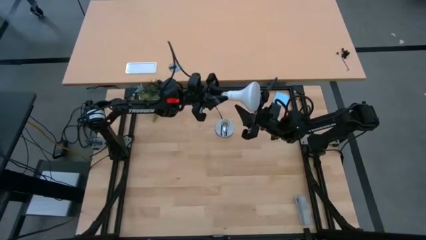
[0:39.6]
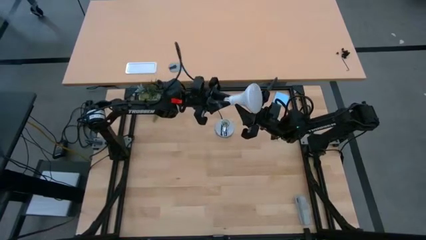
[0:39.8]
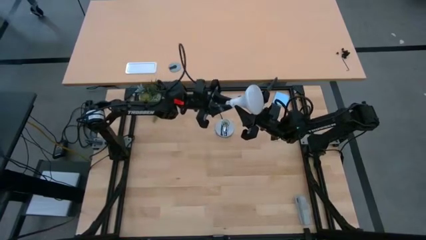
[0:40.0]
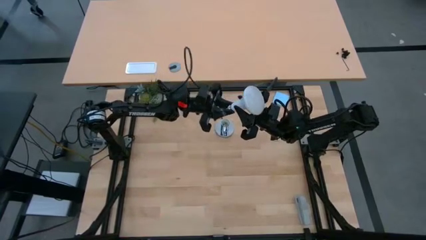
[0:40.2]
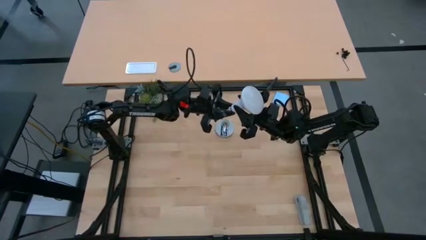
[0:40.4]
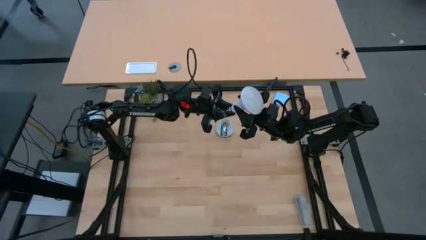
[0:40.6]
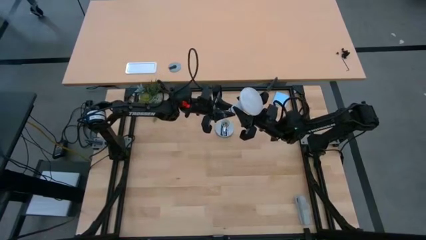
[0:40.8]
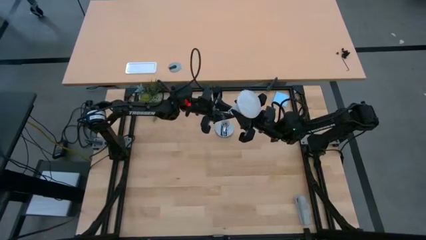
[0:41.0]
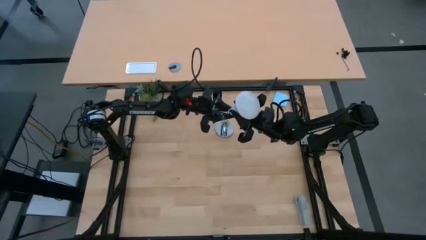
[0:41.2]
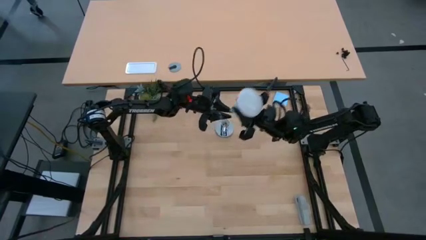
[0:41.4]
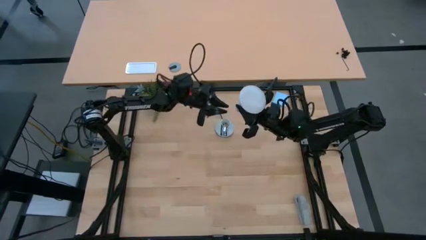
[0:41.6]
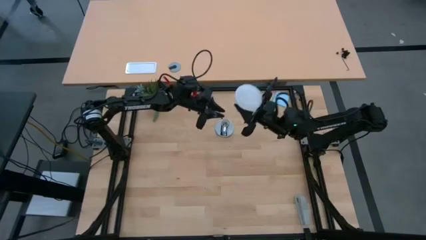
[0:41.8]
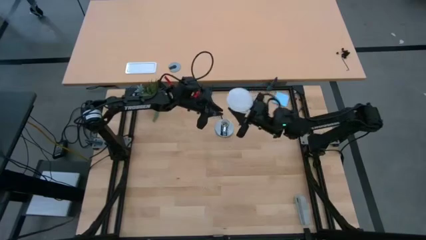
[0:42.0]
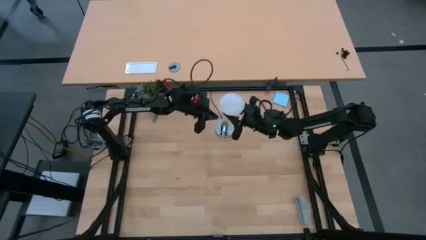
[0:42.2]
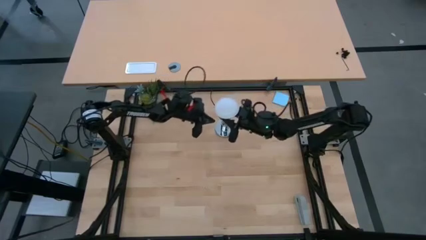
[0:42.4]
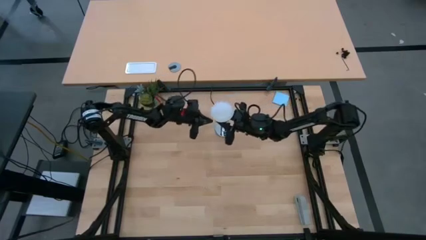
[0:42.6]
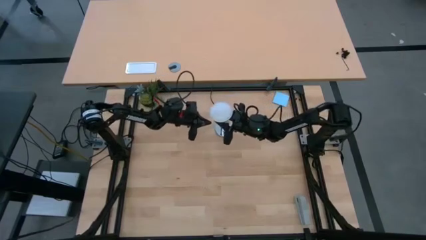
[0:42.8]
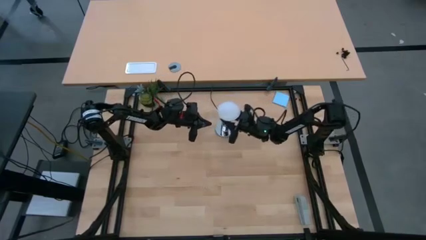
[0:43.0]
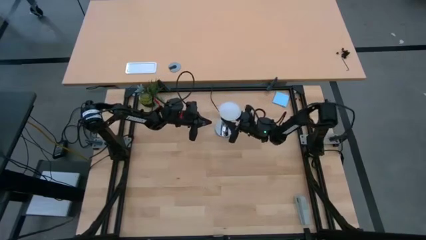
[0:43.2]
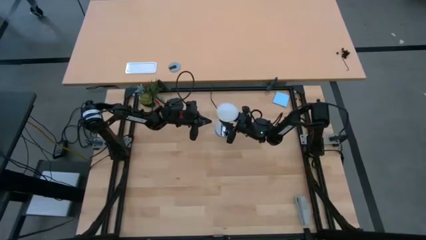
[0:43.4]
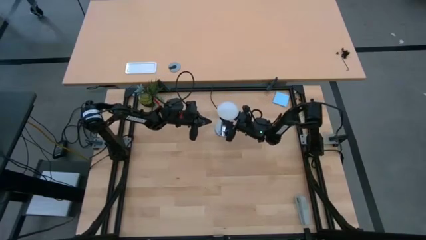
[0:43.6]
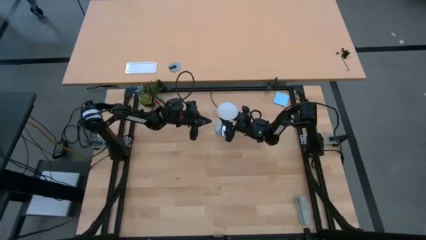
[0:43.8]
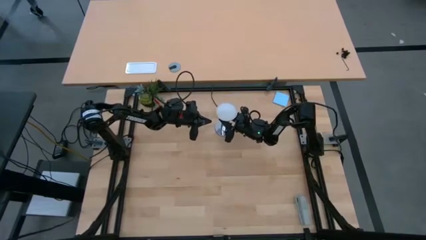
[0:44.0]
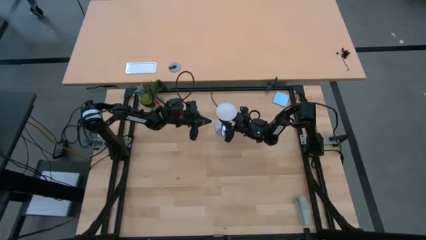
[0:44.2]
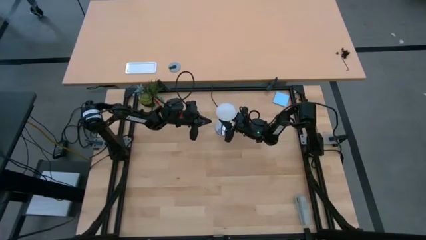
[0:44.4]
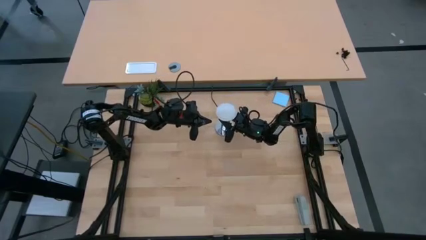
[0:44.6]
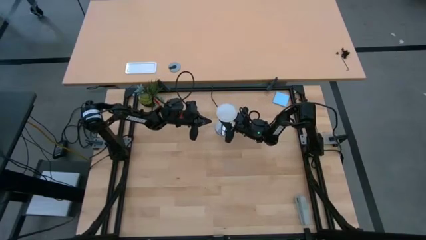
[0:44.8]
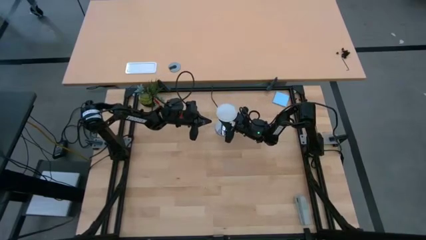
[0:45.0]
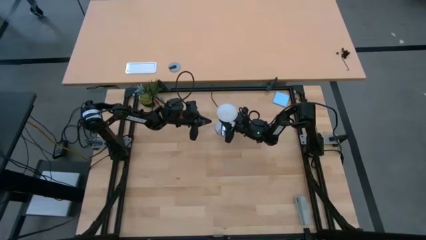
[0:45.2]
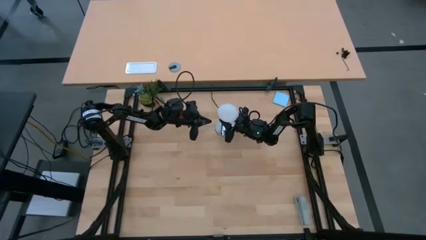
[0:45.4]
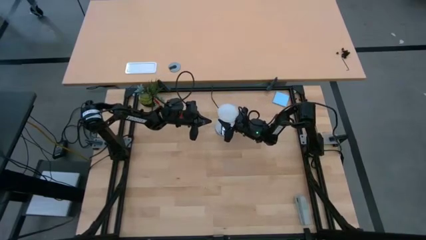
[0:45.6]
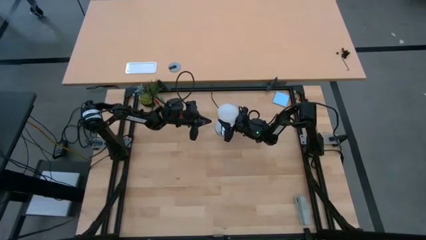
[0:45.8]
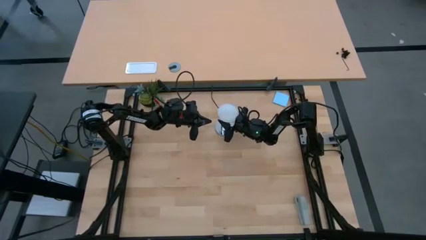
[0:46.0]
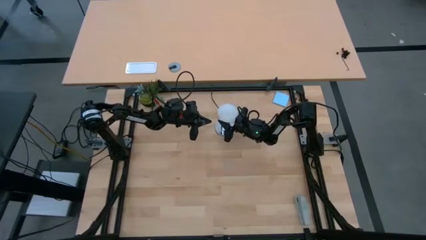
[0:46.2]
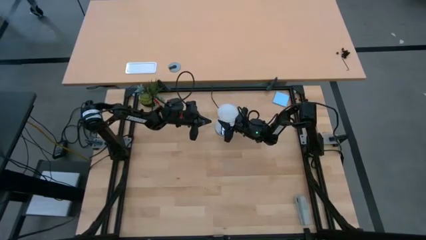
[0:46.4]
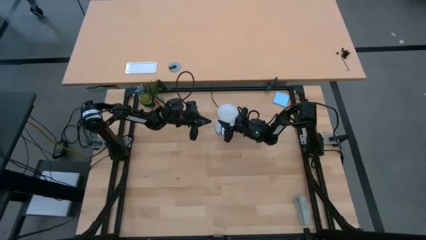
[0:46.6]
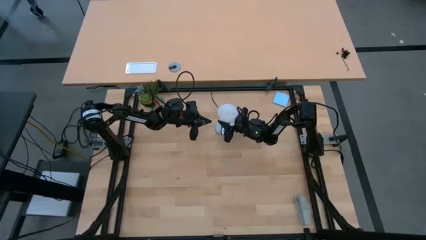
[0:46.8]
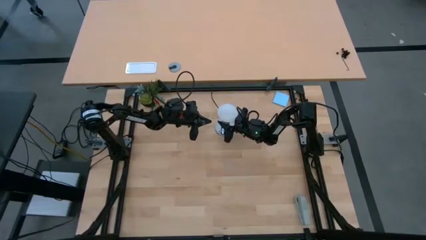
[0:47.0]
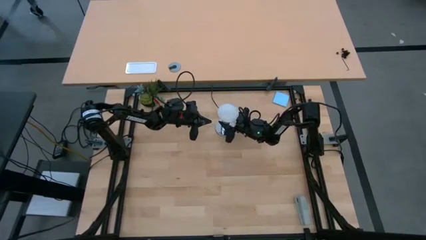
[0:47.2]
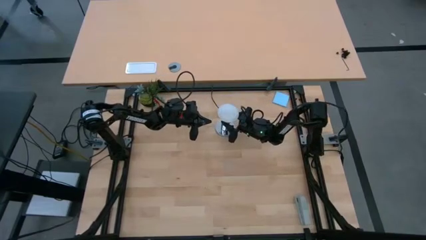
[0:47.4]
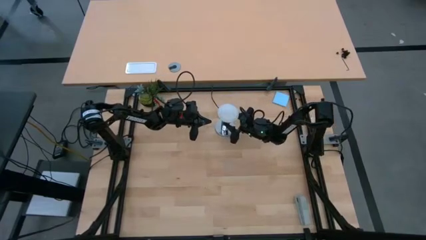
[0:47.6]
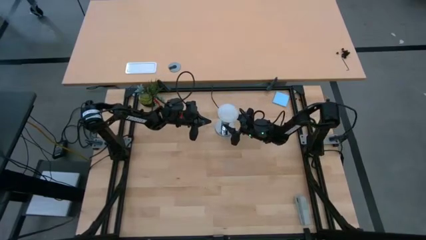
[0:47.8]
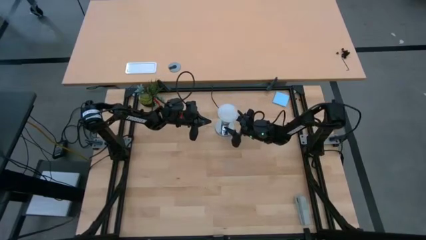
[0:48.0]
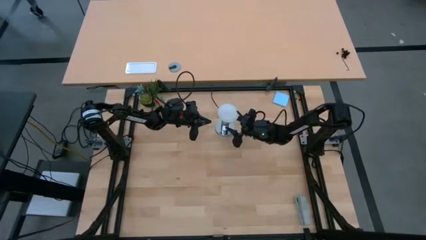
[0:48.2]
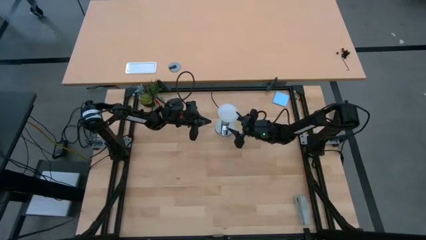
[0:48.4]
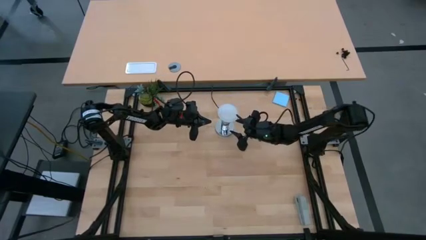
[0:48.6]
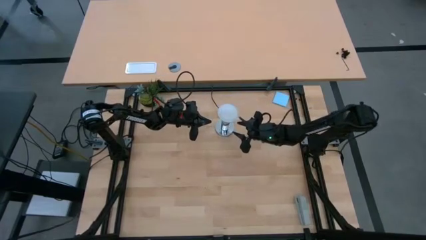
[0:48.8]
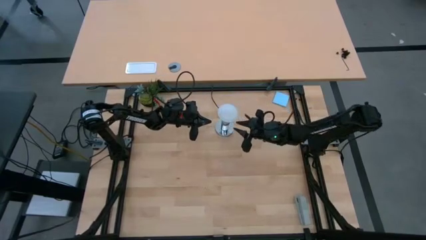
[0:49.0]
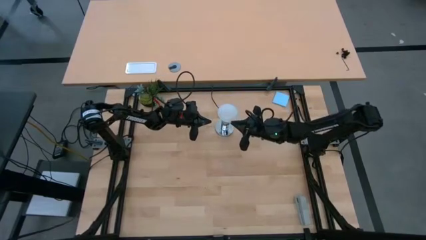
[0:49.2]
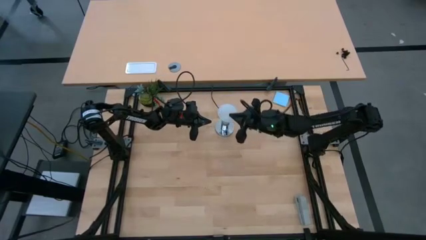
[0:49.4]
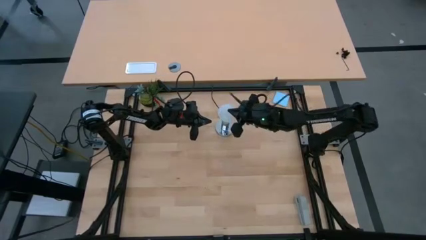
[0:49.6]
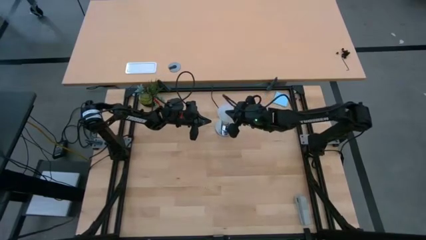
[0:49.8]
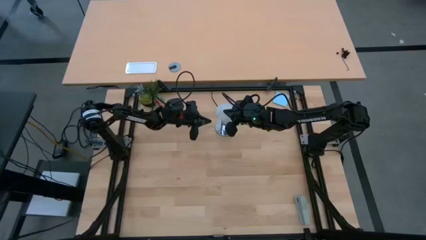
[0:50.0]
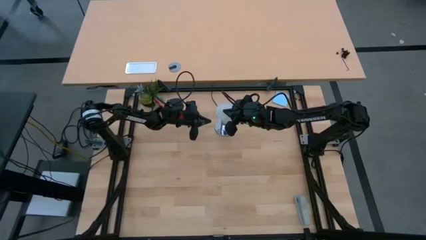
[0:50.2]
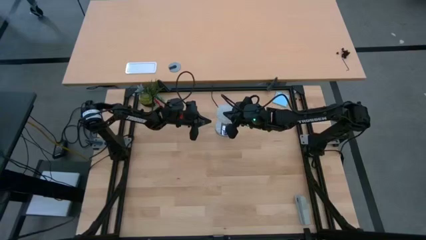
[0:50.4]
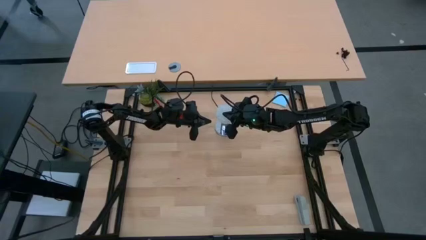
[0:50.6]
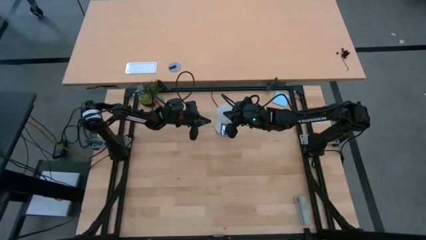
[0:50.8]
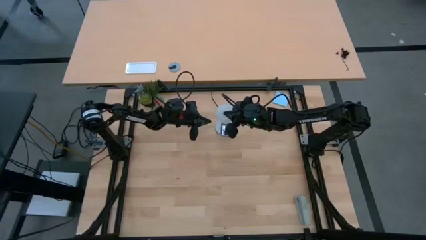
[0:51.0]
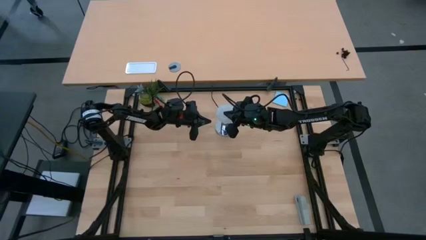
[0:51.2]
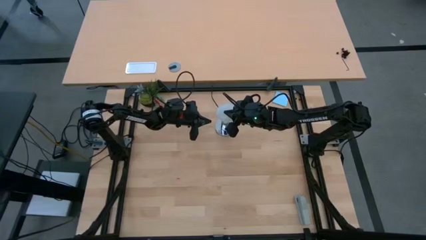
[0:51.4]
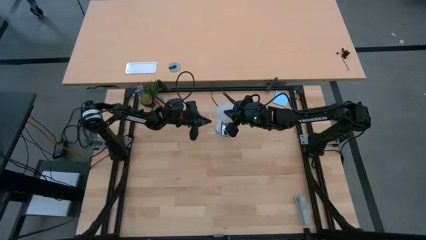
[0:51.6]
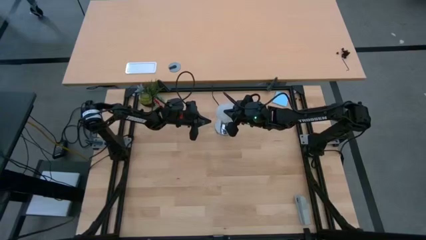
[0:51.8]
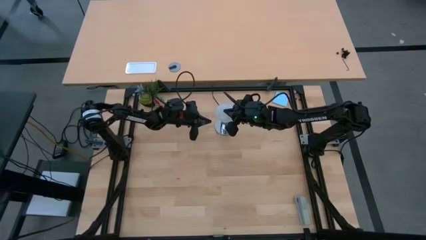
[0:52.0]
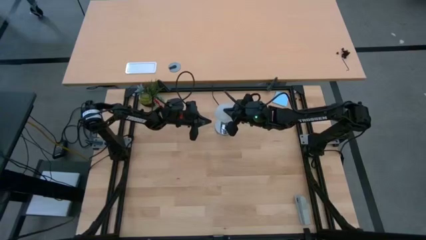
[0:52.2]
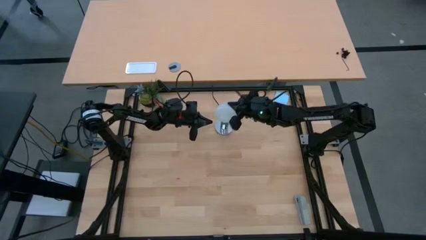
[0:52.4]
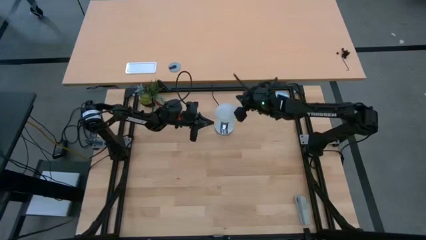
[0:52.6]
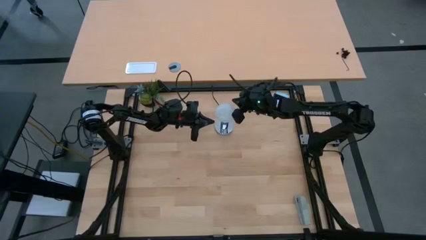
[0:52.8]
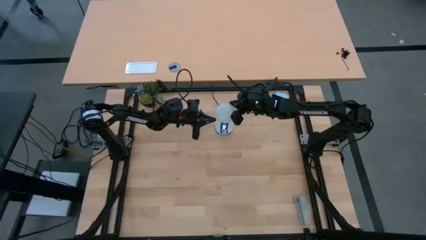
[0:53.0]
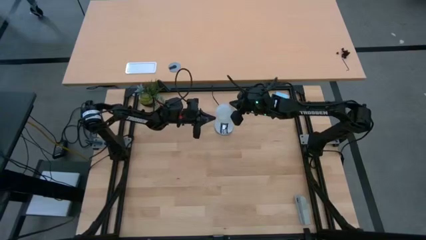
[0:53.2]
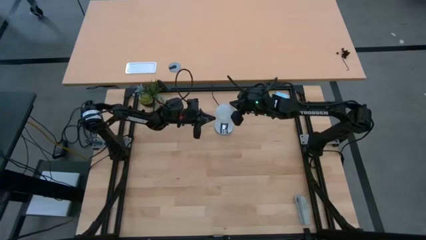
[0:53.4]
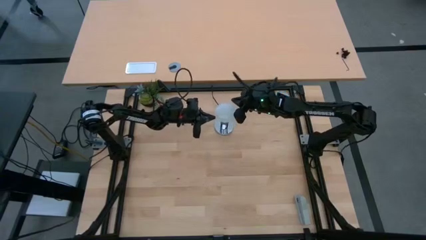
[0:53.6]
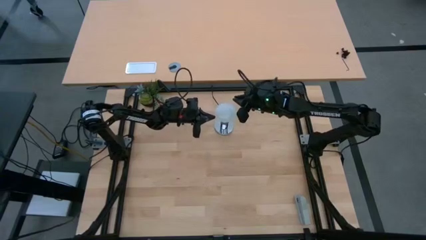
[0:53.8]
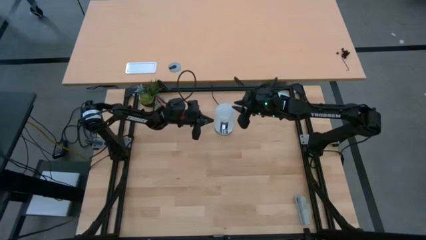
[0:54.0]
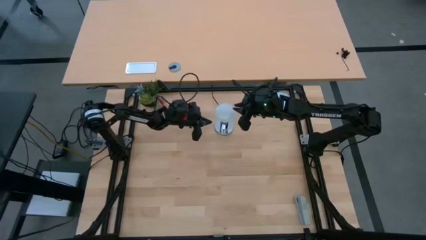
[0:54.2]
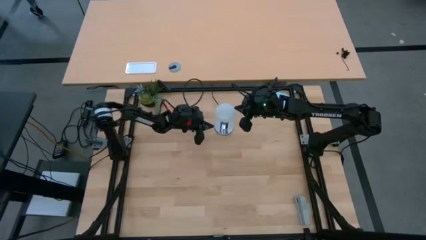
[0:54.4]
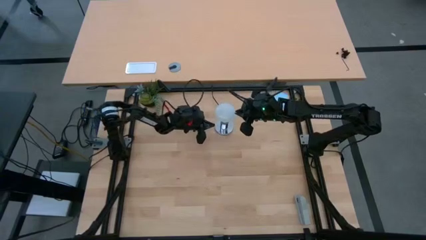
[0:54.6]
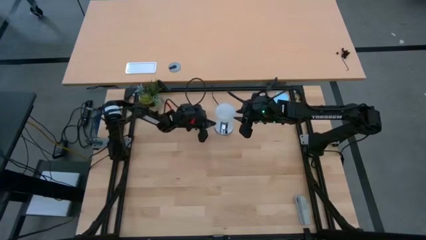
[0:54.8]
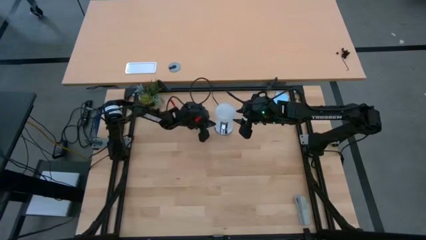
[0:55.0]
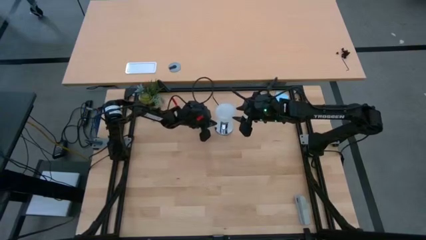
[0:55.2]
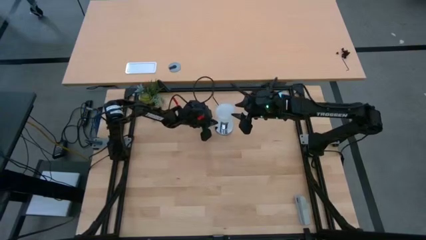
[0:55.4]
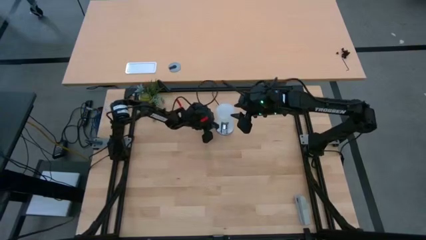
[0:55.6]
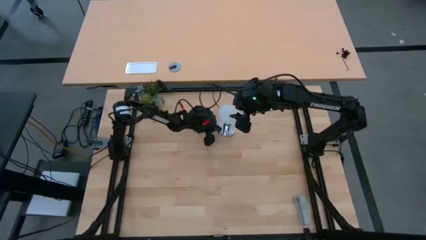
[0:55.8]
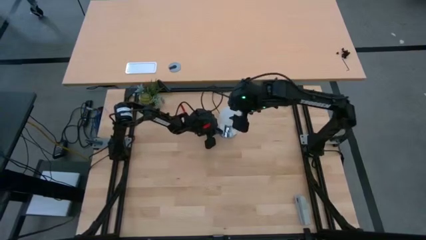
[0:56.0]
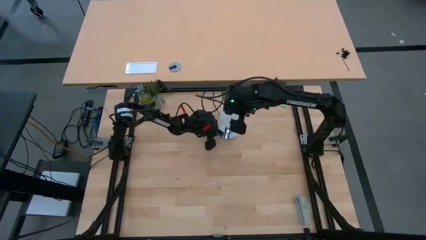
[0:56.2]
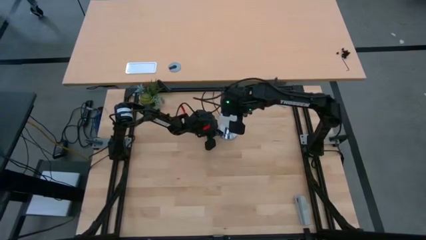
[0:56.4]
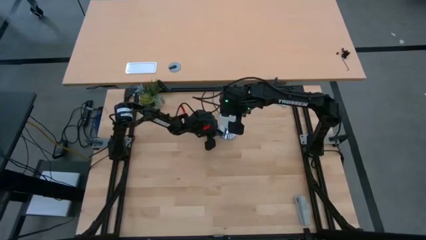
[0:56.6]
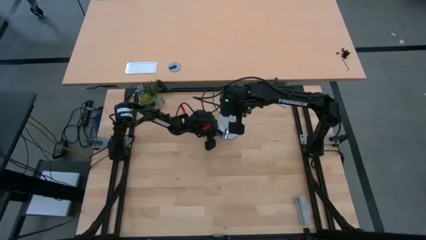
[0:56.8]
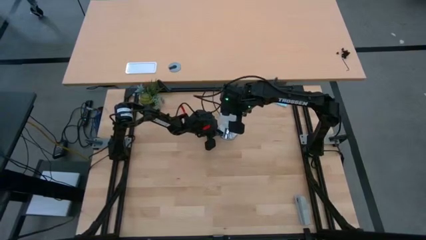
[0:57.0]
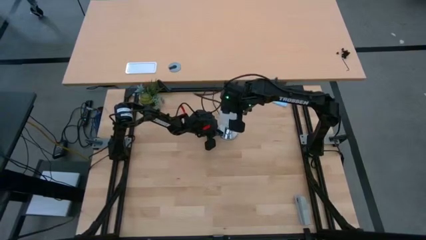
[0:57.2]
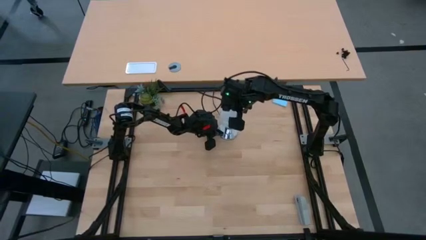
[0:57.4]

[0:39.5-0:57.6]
Task: Screw lightbulb
Insert the white lightbulb into the desk lamp
